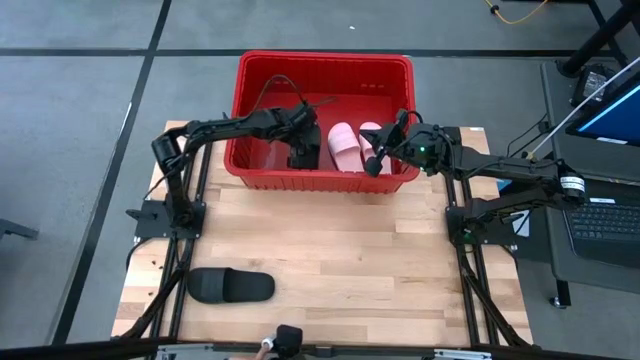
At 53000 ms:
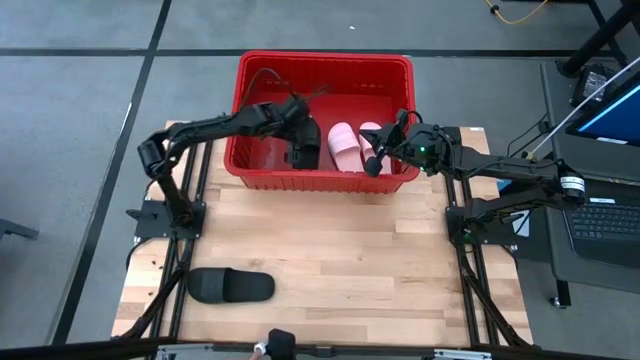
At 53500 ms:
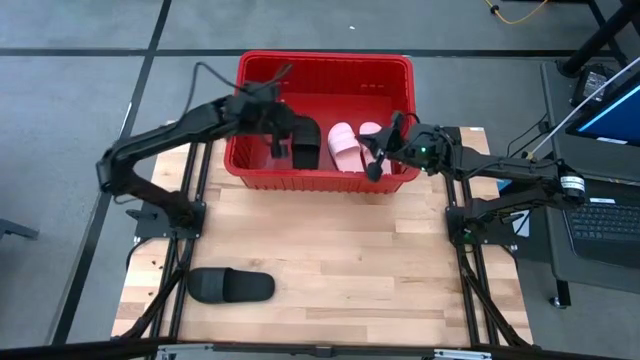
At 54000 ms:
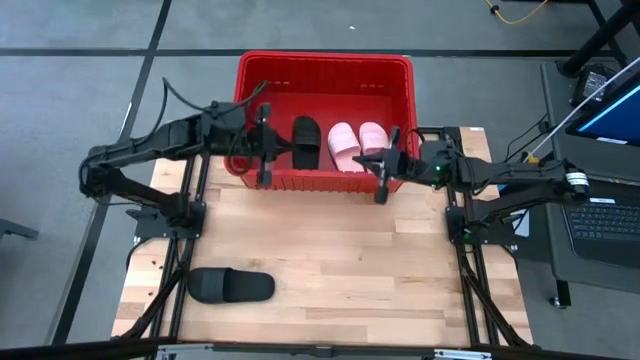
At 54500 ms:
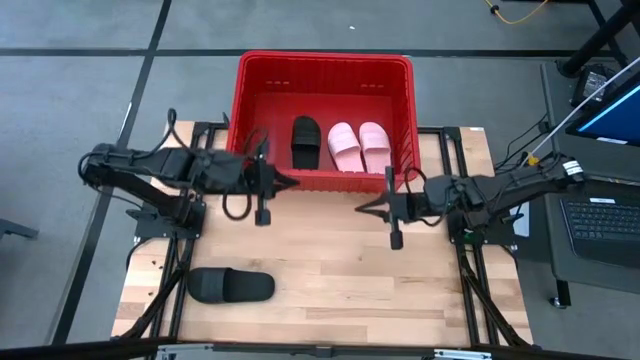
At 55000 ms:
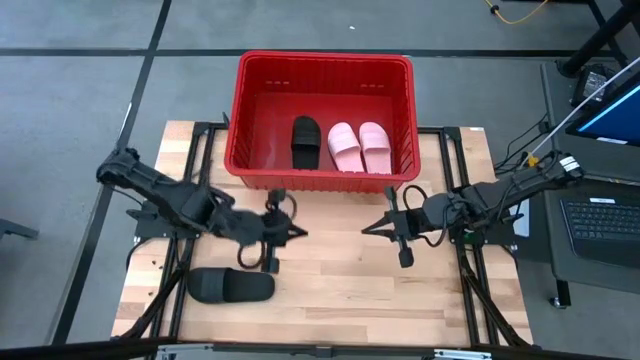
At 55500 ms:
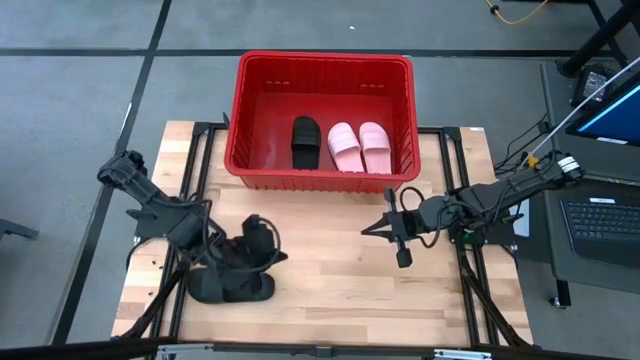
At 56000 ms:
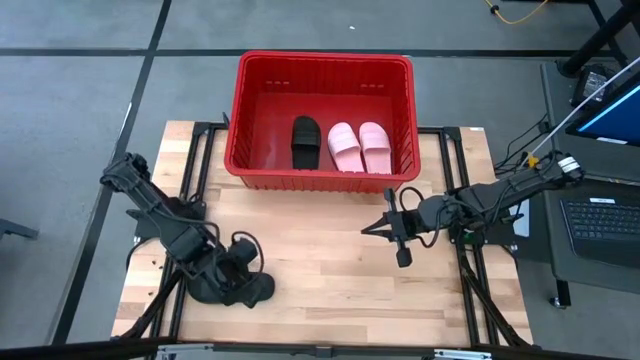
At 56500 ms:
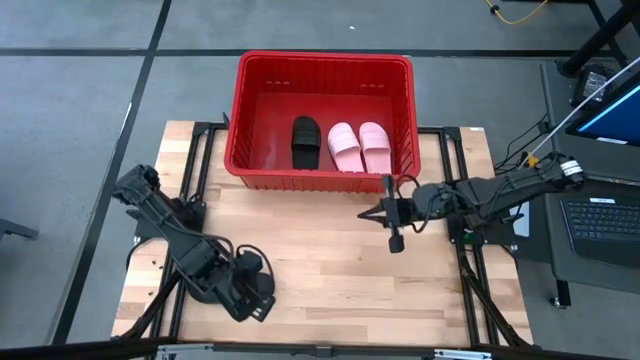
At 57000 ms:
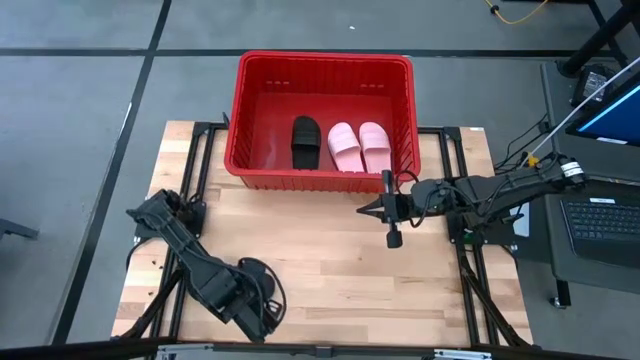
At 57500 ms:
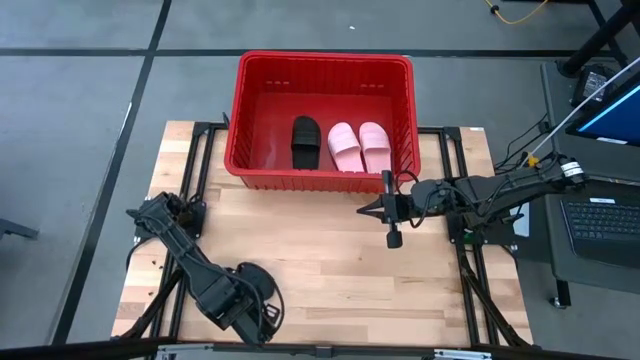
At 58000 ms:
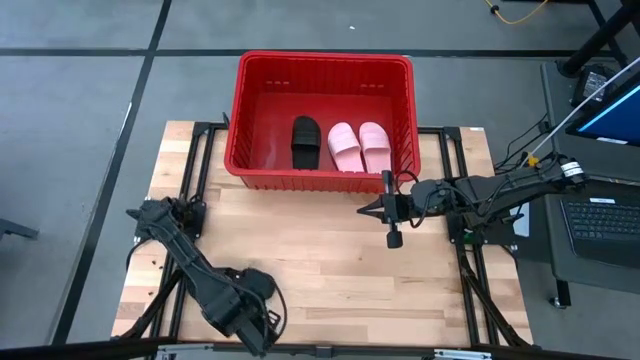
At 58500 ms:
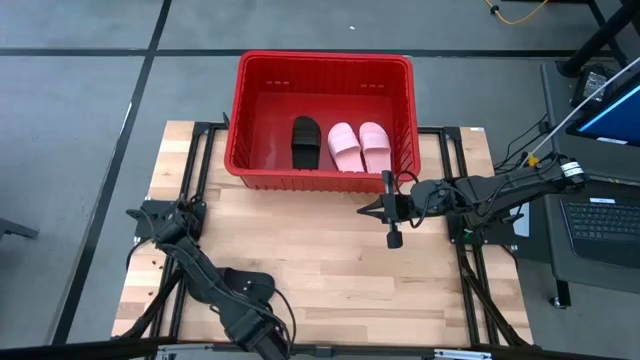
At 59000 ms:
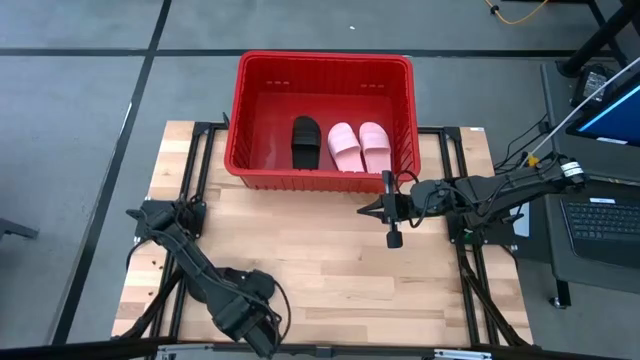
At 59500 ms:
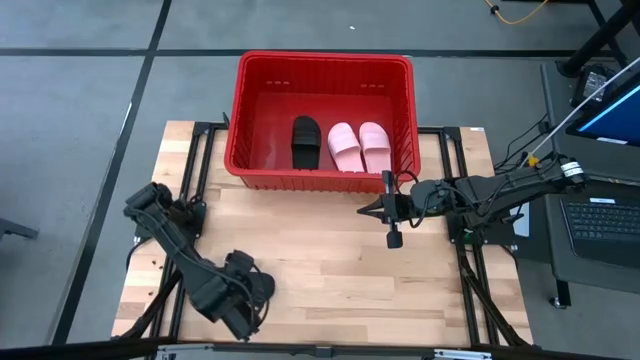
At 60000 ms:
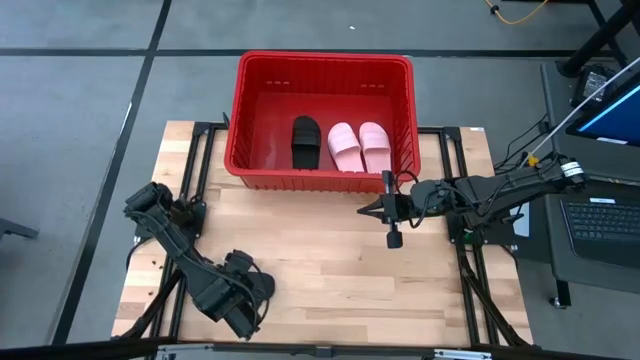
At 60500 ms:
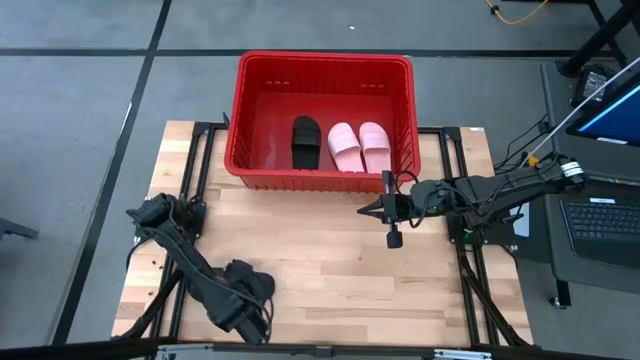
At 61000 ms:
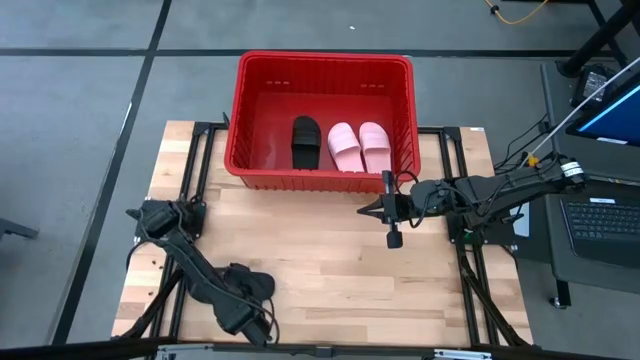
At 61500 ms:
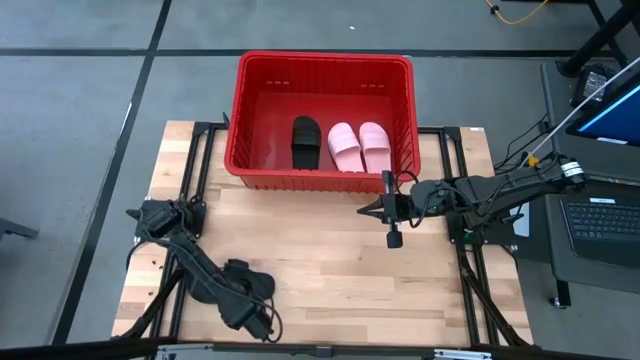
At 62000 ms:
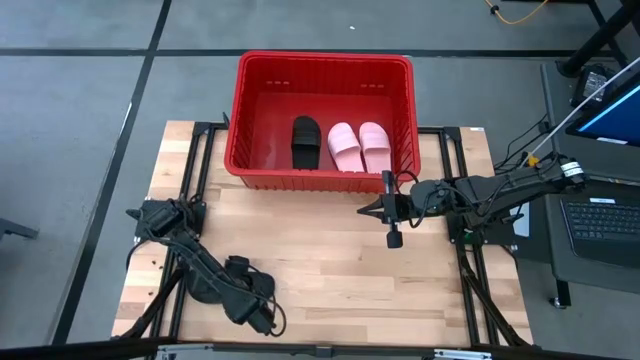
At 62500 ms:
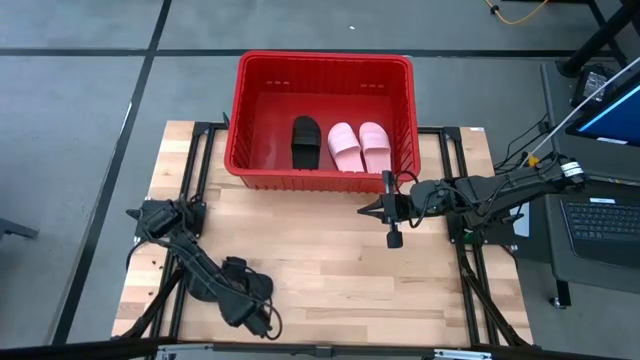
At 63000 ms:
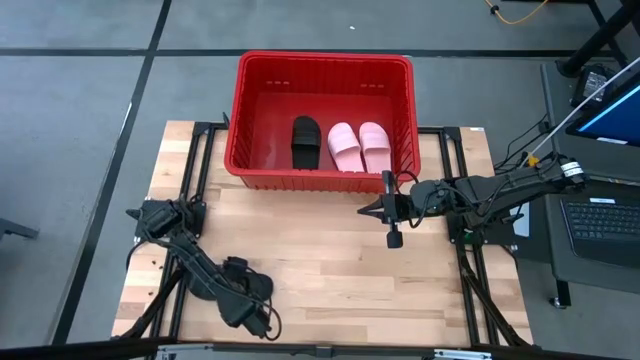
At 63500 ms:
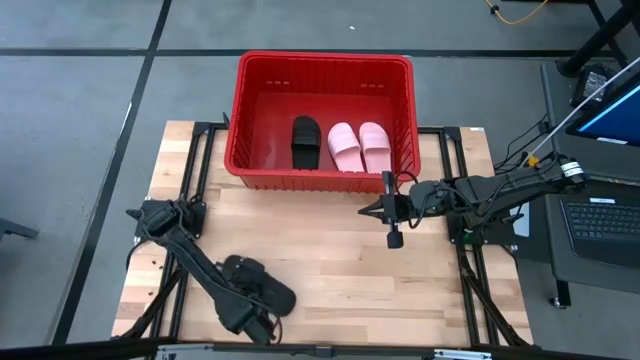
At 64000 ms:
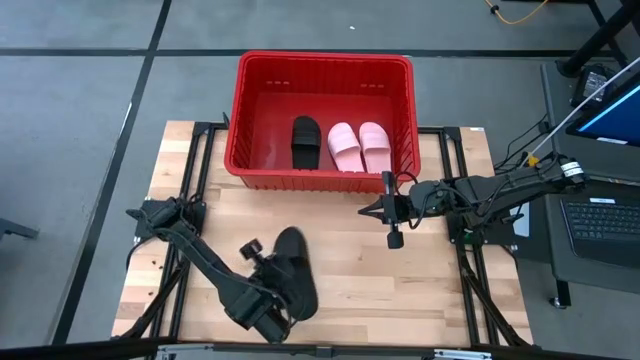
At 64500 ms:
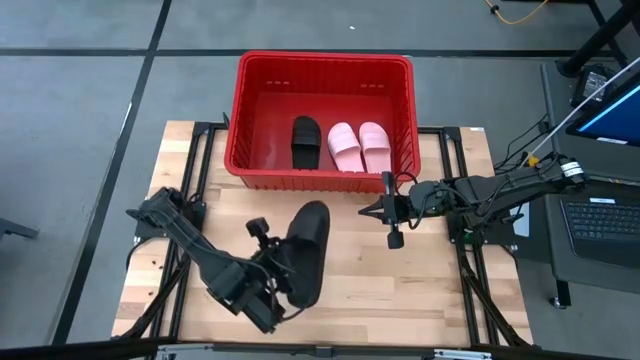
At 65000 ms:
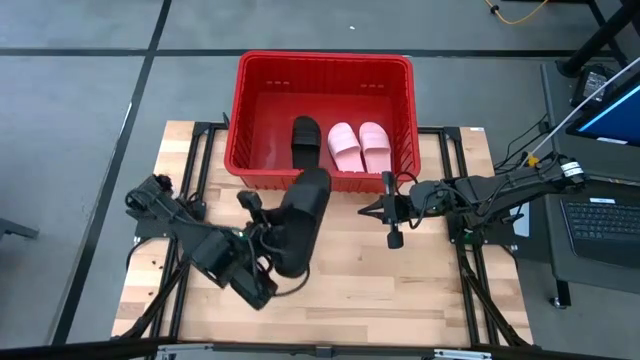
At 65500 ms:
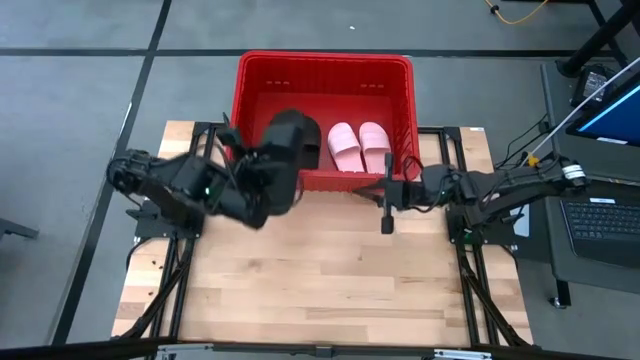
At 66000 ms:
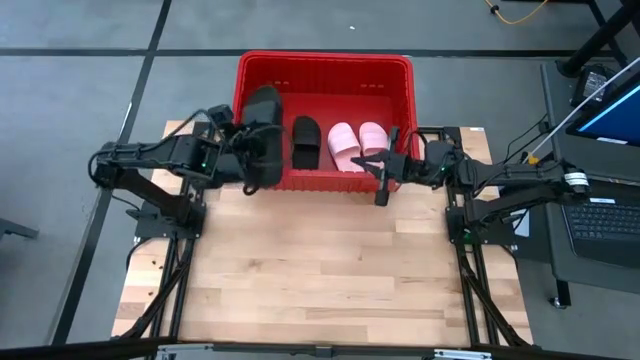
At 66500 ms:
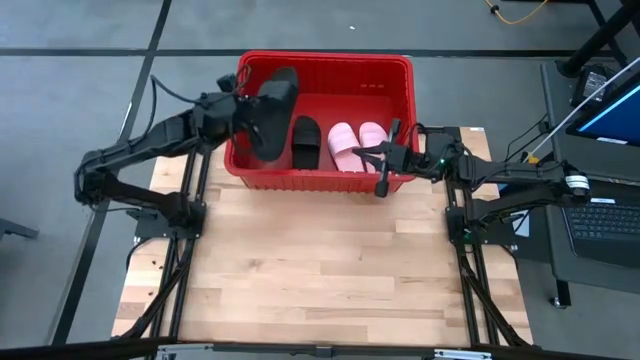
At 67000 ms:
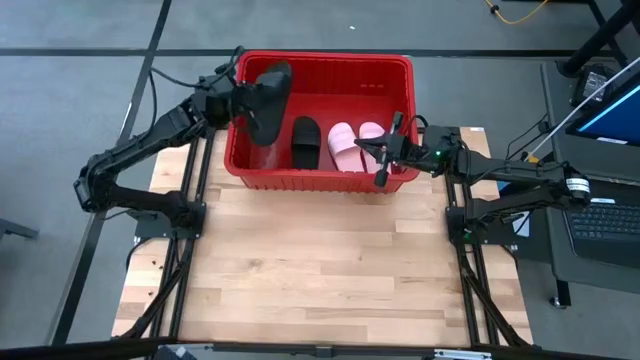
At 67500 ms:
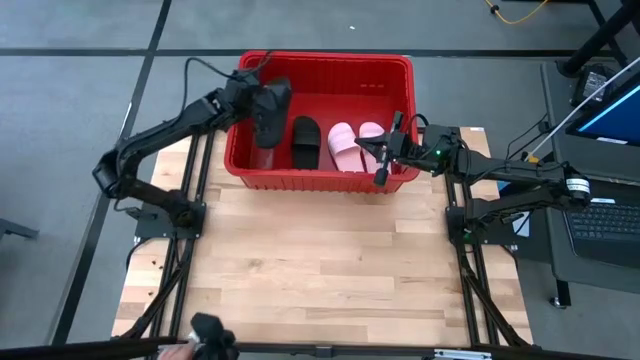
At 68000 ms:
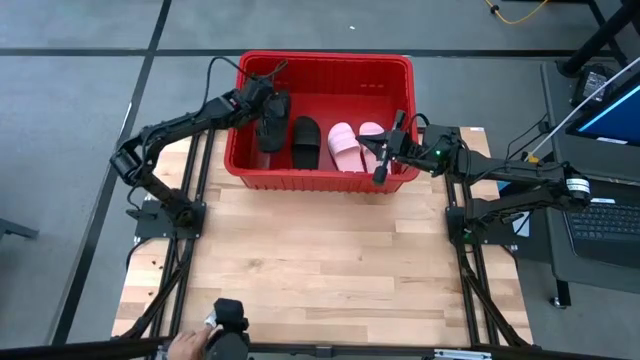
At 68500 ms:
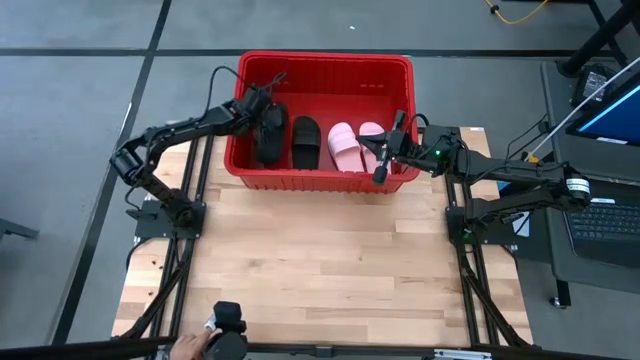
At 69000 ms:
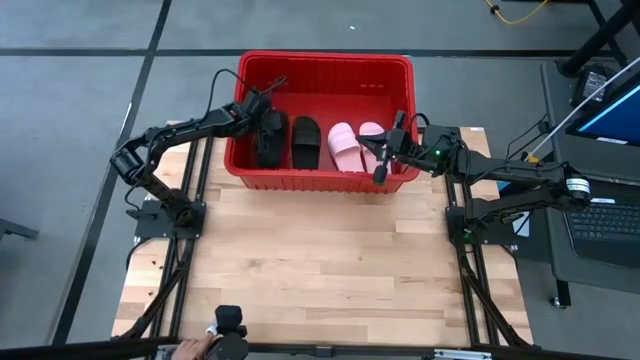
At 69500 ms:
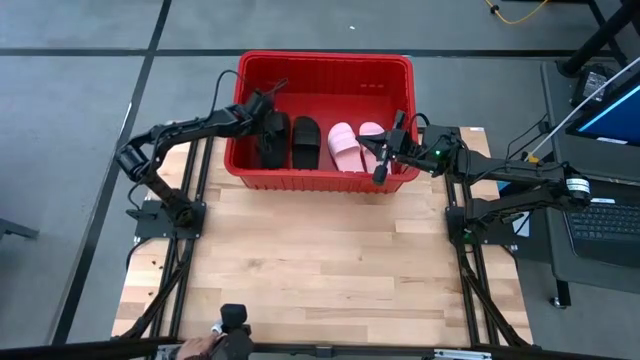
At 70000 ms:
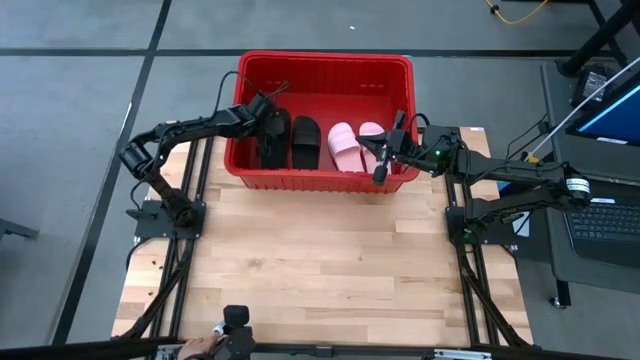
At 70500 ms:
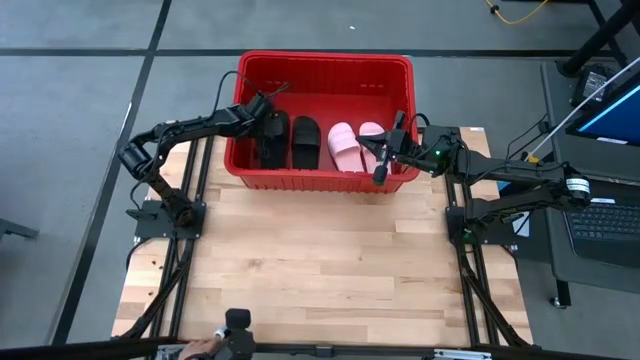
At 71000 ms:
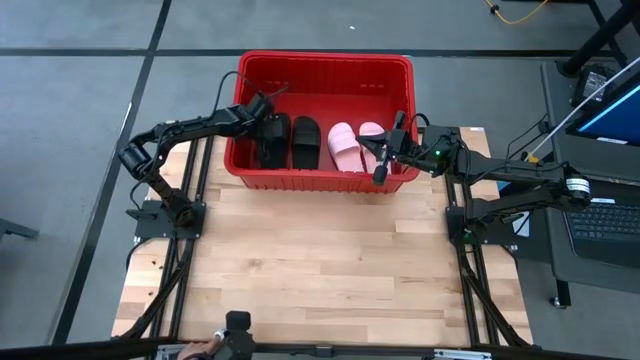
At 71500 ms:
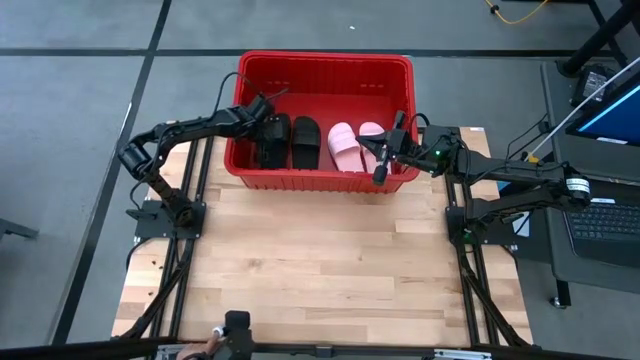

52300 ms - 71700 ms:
Task: Pick and place slides into bin
Put the black slide into the red container

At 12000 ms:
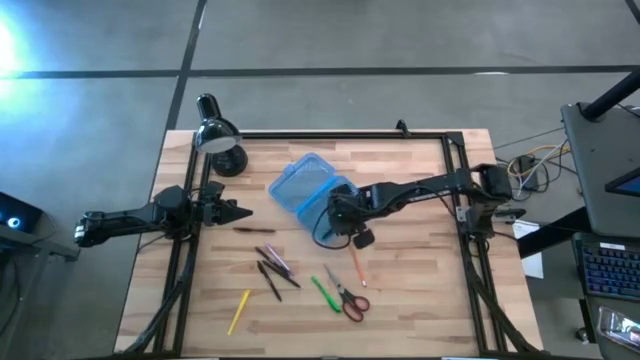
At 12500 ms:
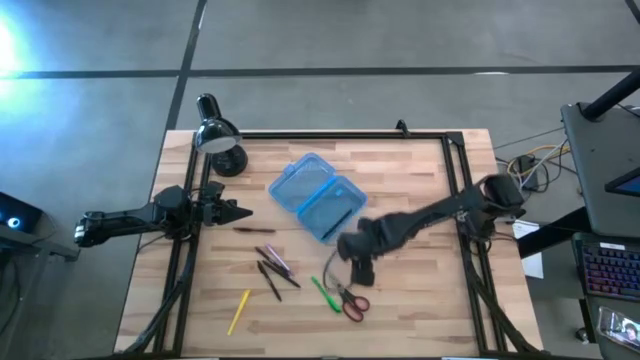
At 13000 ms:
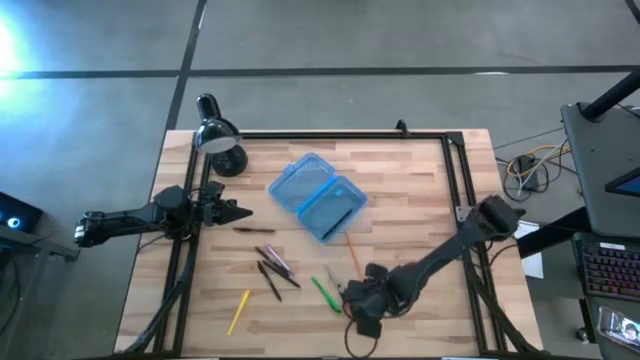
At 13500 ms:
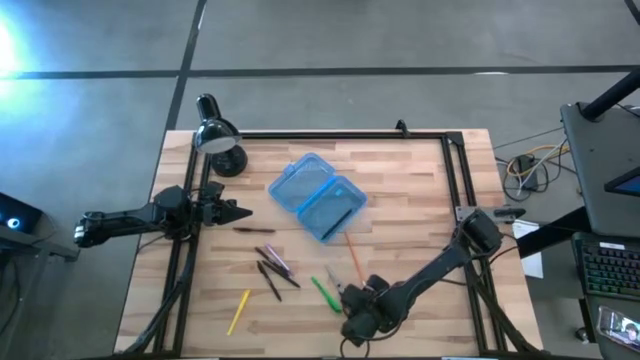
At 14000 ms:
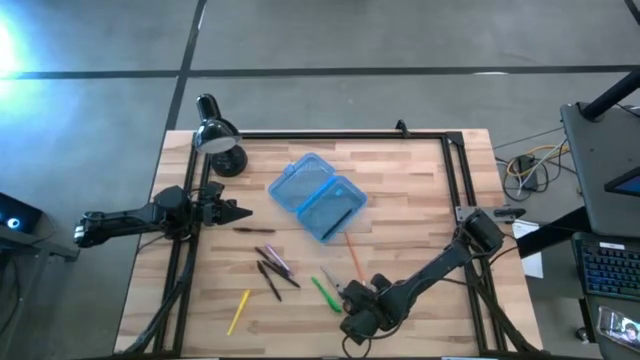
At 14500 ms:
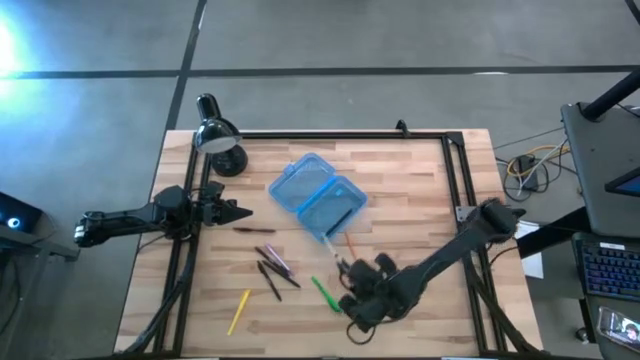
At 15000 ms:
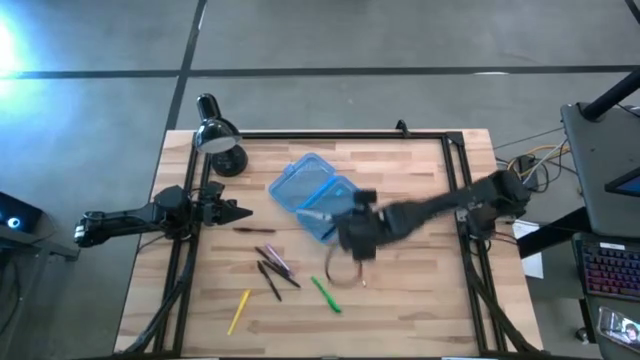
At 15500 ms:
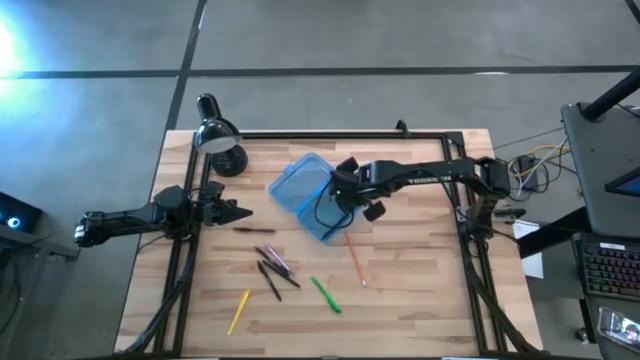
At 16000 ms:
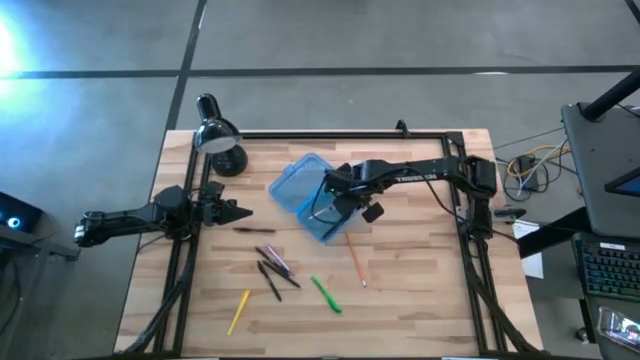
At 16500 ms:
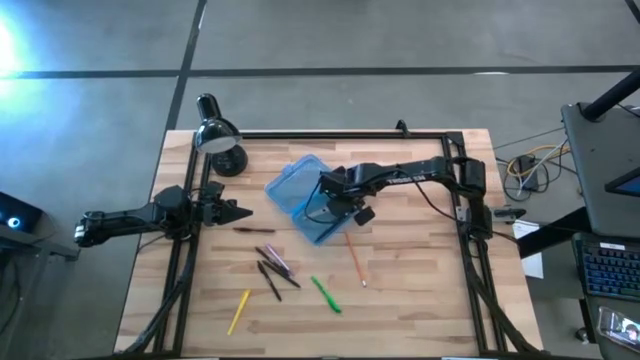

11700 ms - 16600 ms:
Task: Pick & place school supplies into a supply box
Put the scissors into the supply box
